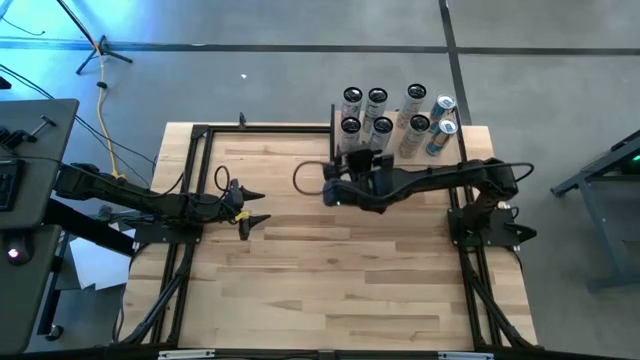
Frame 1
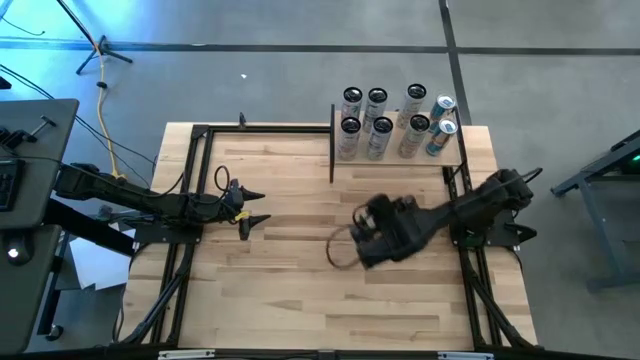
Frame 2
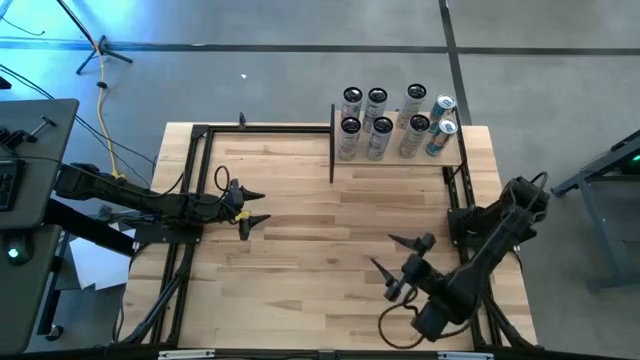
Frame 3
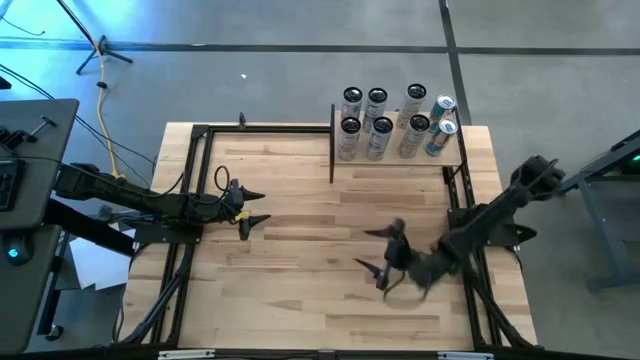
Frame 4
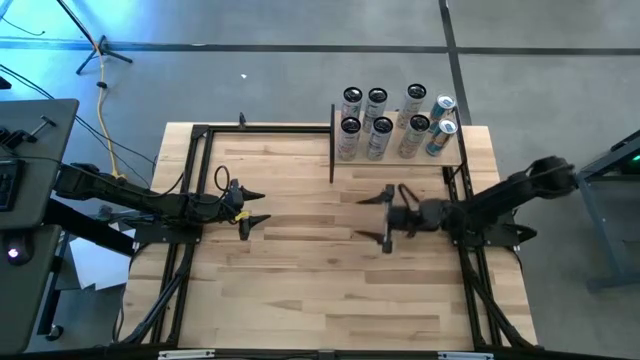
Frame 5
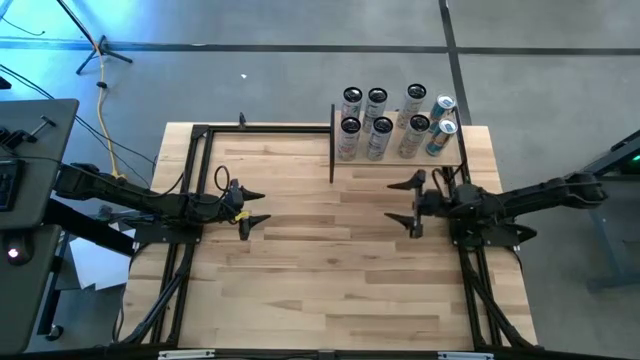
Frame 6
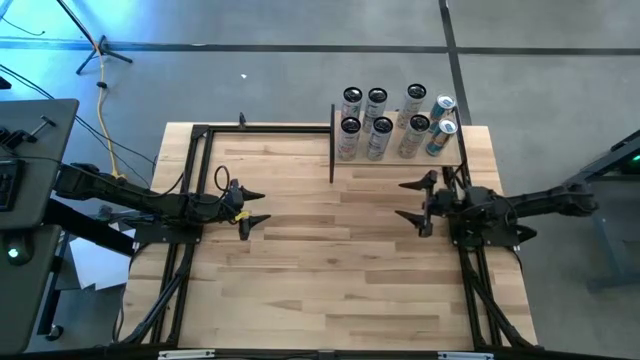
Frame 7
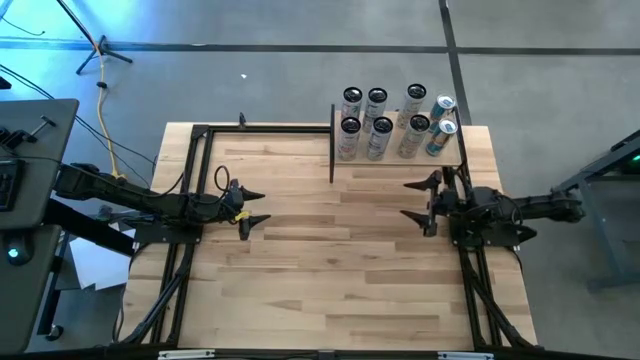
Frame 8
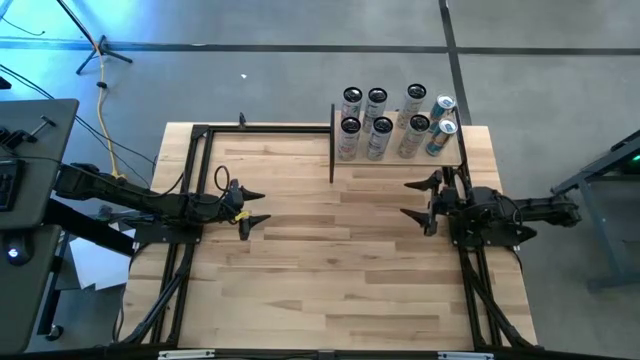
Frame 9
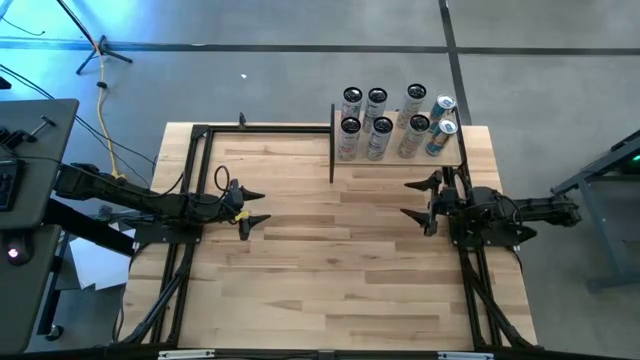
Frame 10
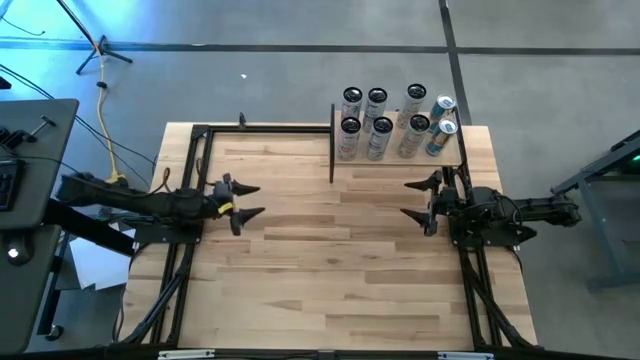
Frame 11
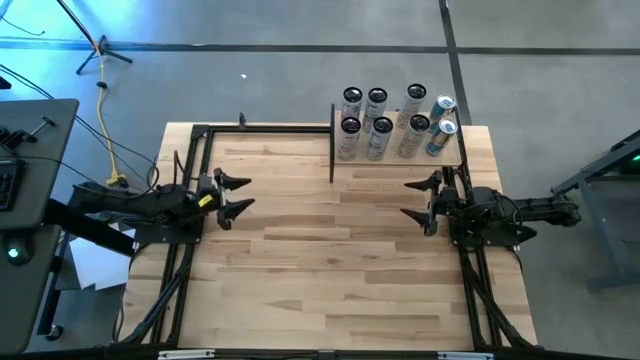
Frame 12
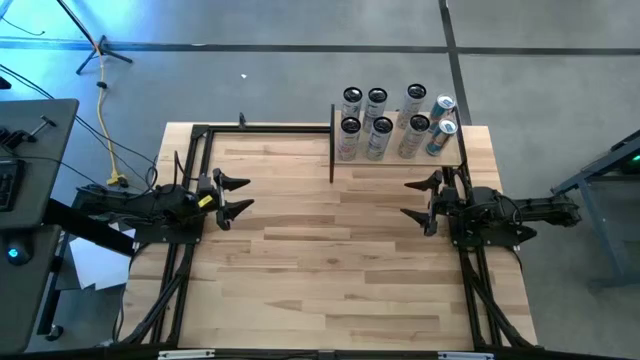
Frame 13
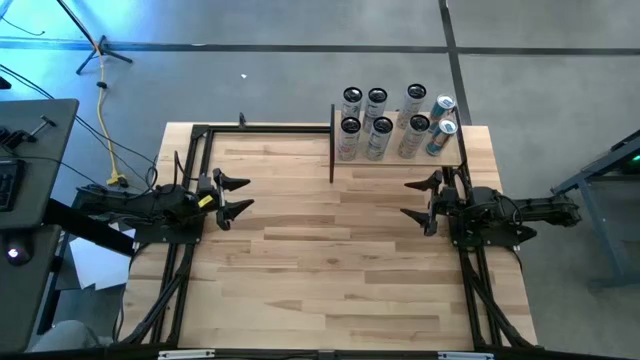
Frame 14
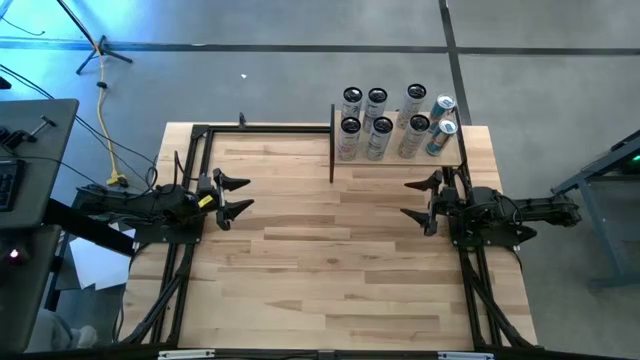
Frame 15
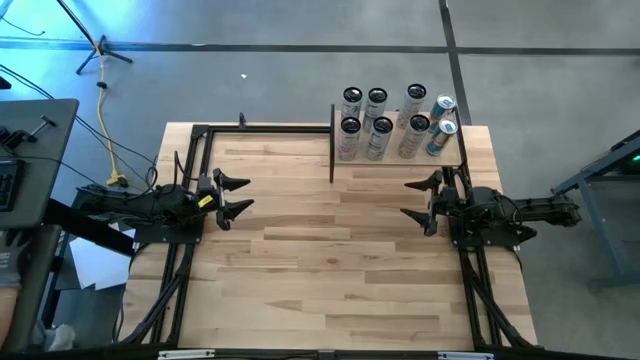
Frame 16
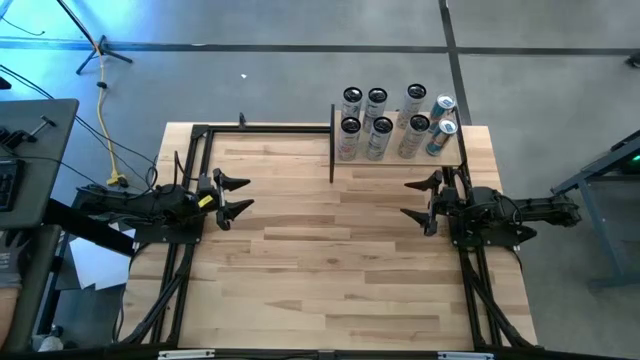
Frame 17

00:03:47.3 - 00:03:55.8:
Task: Place canned beverage on shelf
Return to Home Position

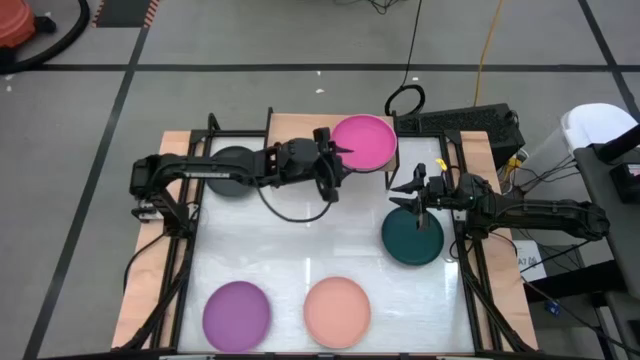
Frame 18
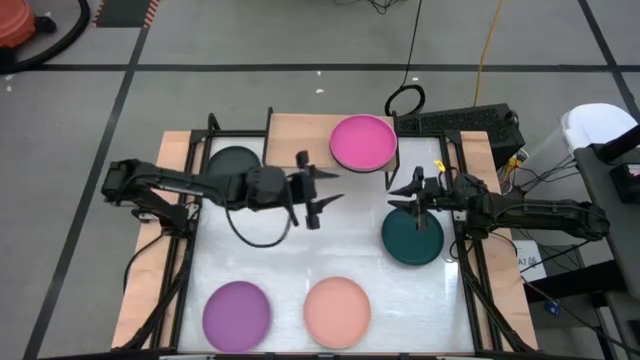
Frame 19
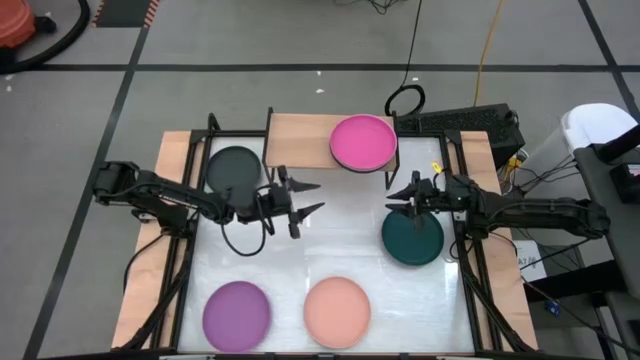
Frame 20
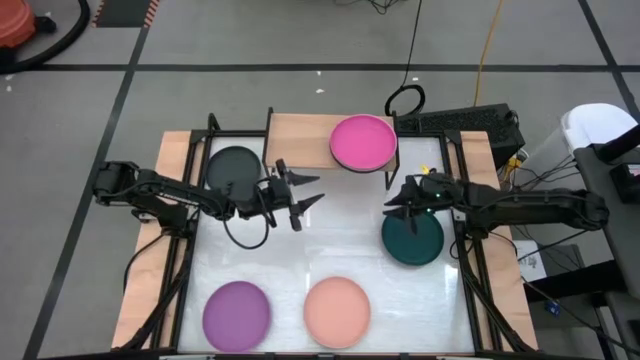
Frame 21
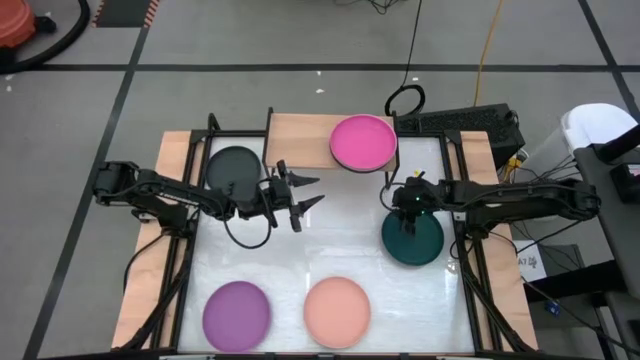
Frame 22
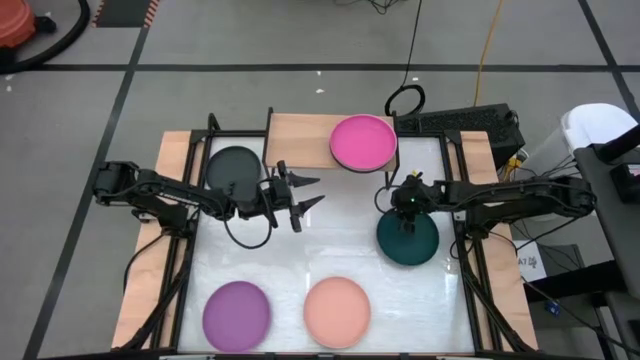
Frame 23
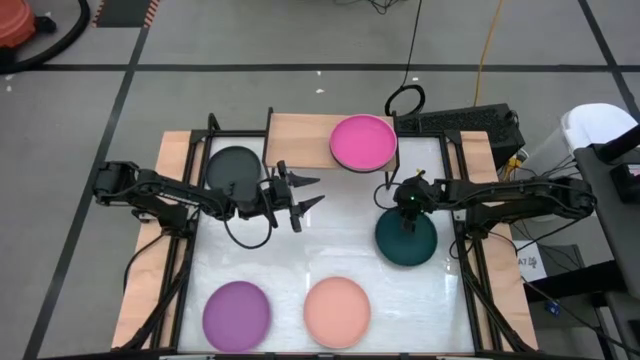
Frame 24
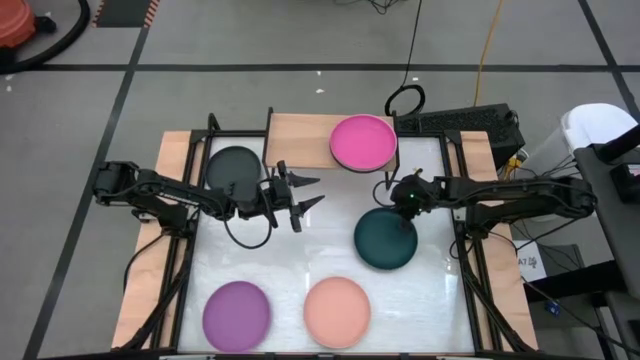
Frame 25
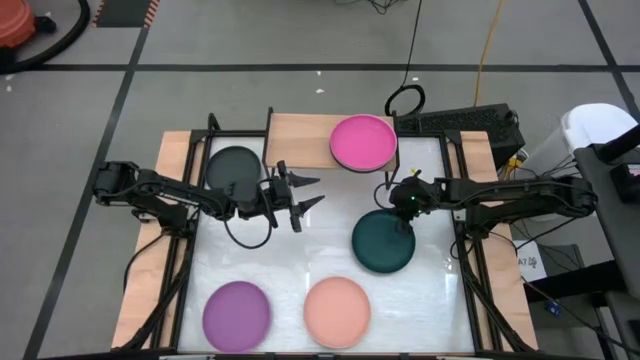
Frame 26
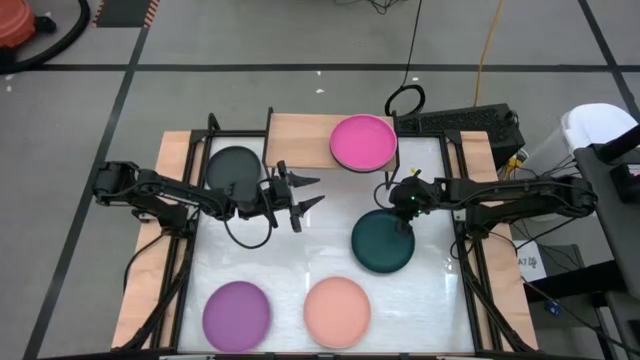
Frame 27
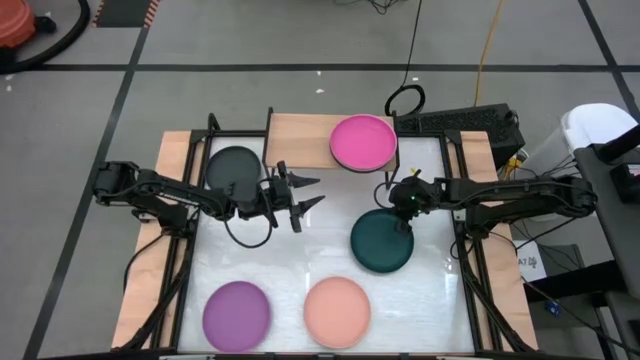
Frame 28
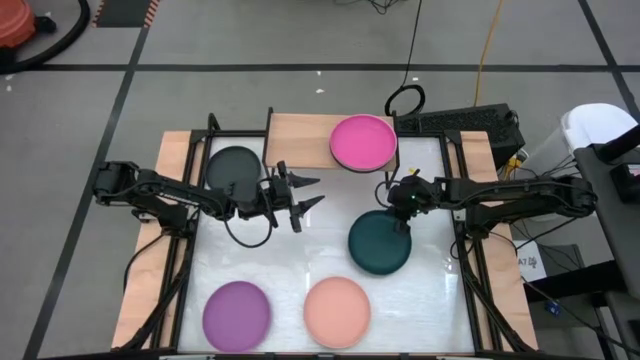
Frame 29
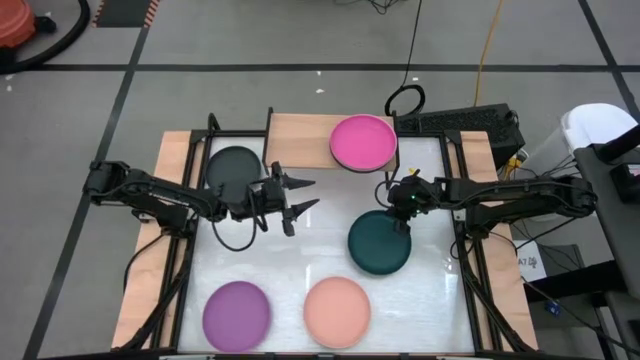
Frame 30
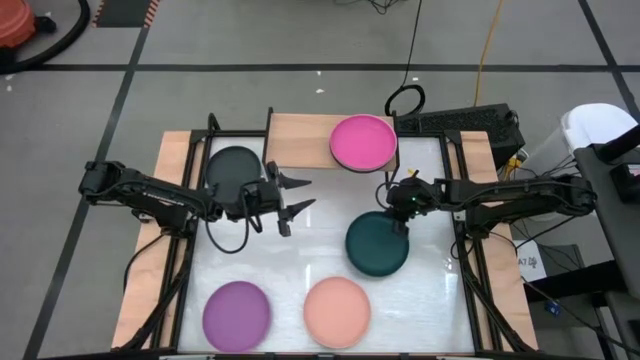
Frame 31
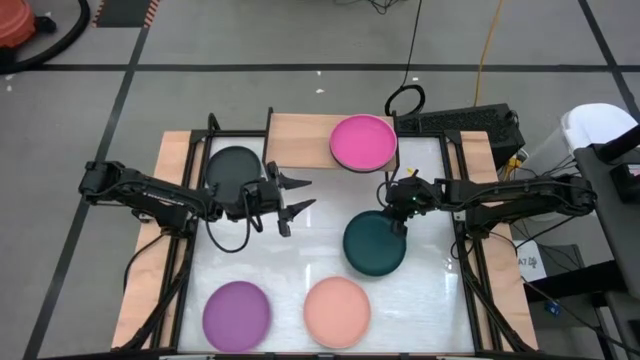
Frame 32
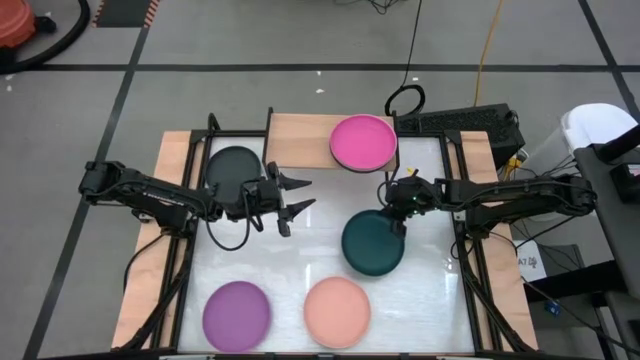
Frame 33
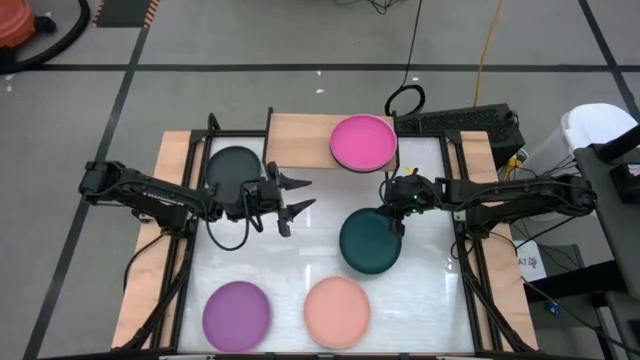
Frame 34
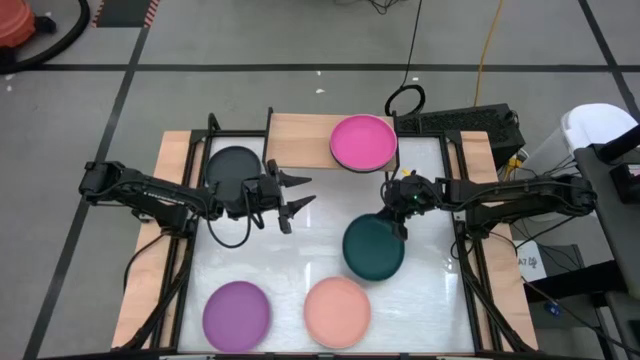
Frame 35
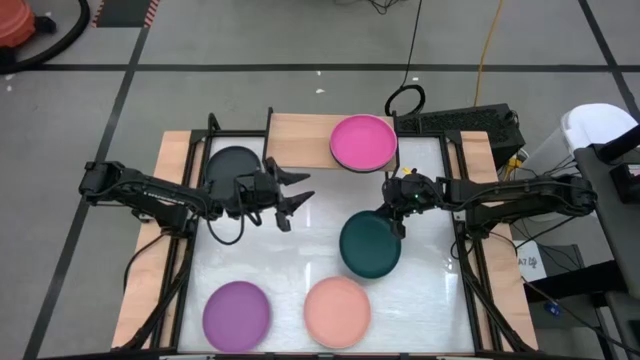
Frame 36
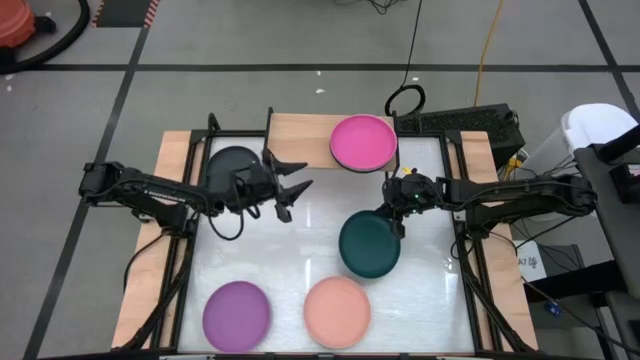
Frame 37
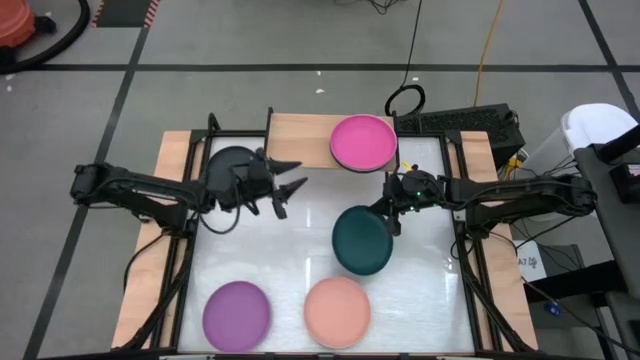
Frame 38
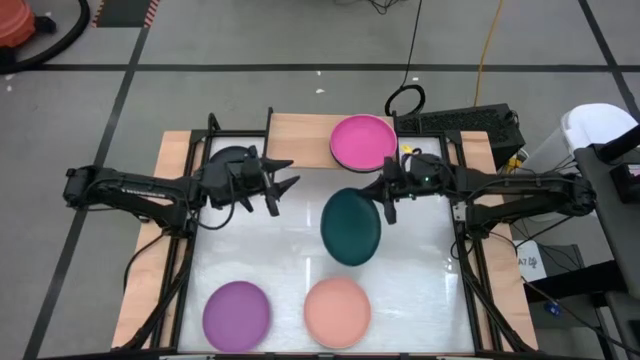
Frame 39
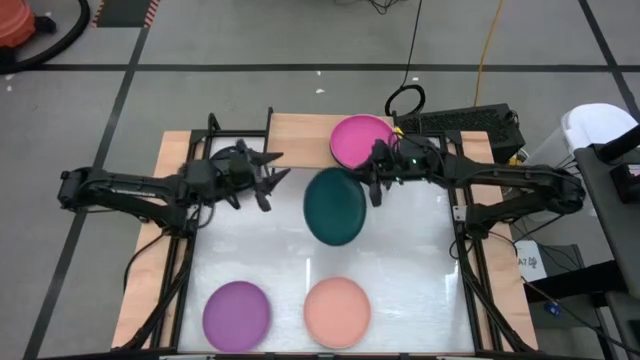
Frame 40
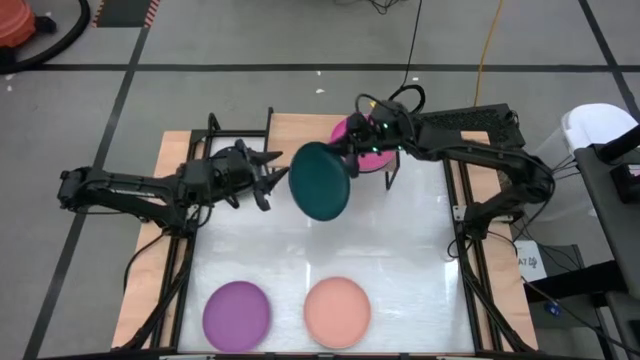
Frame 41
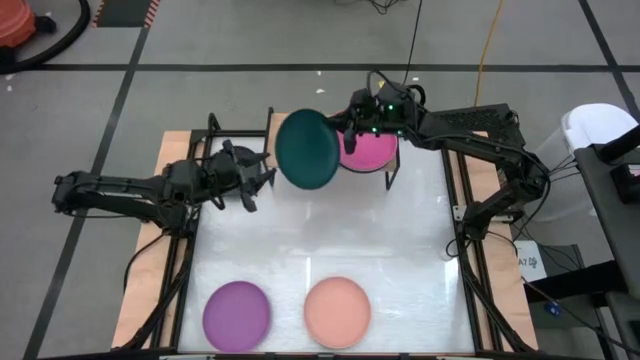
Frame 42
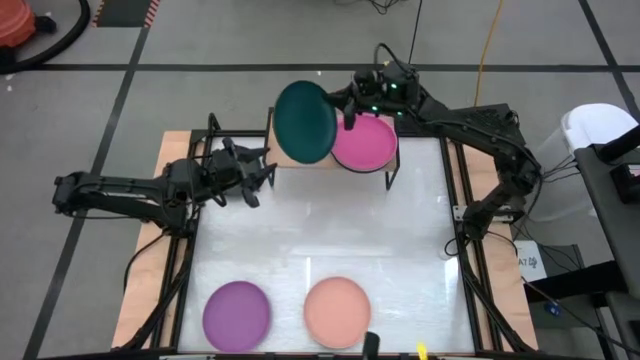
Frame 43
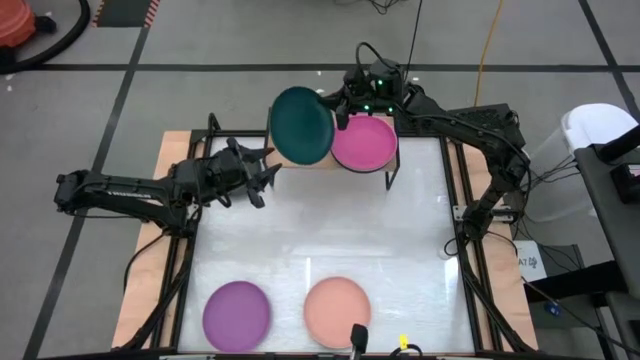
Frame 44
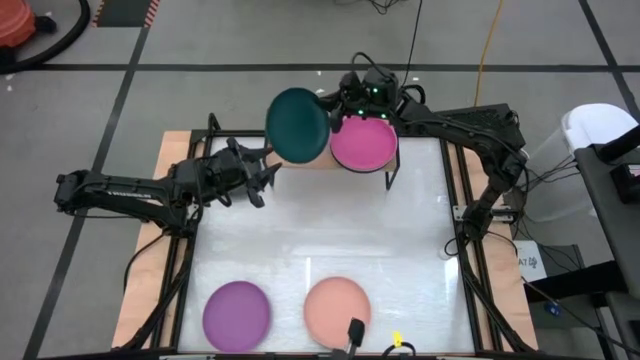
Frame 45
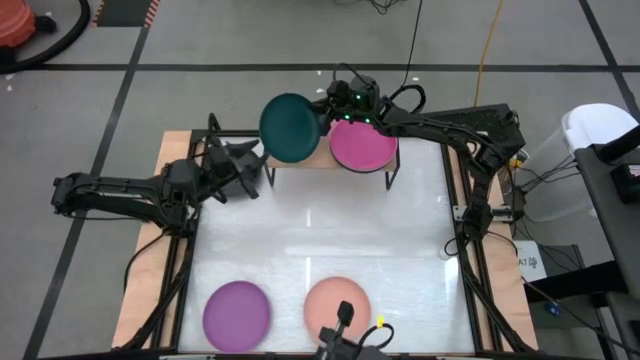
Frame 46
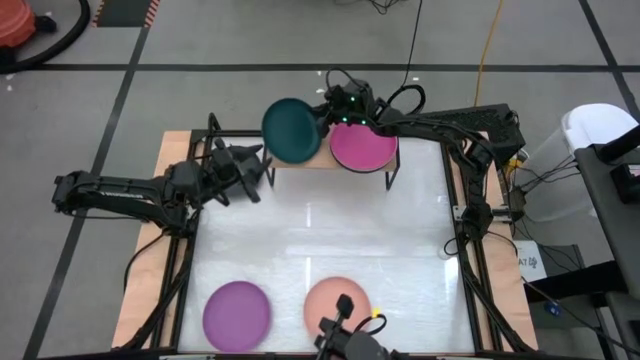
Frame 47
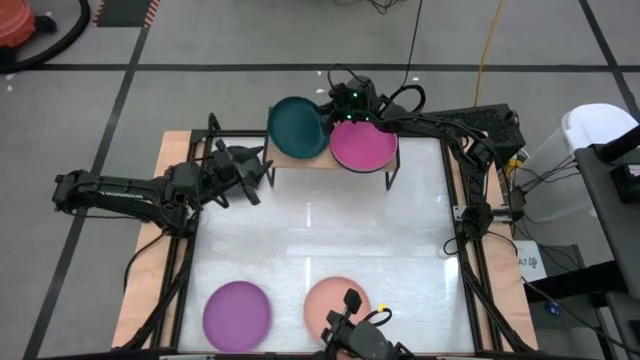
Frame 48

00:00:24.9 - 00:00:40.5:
Task: Place and stack plates onto a shelf
Put the dark green plate on the shelf
